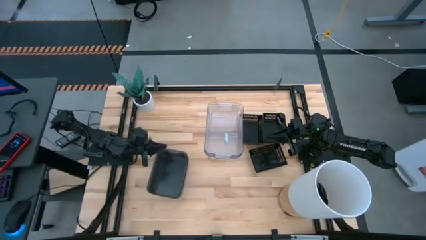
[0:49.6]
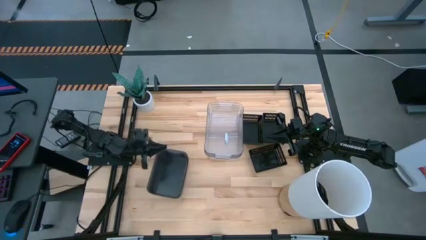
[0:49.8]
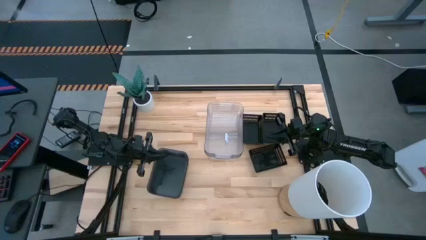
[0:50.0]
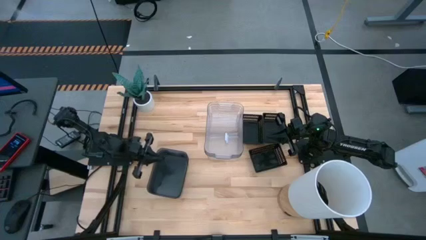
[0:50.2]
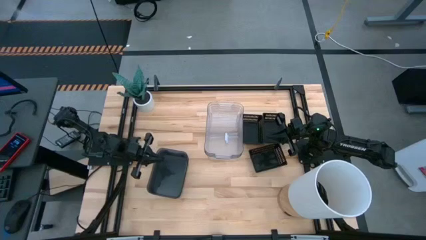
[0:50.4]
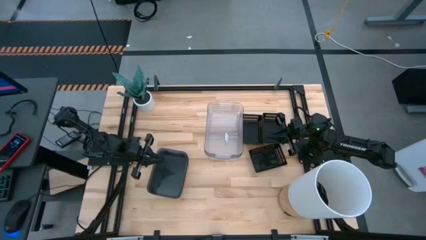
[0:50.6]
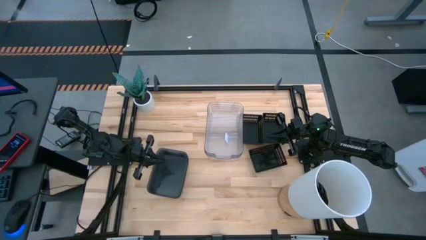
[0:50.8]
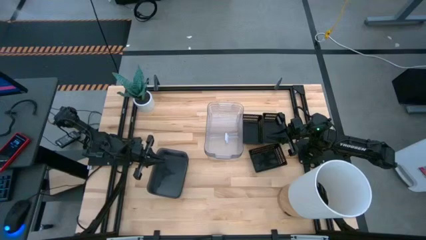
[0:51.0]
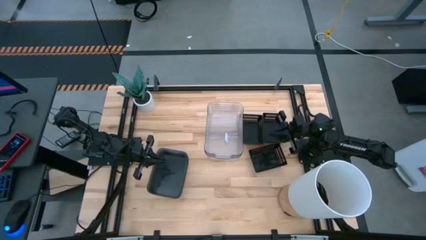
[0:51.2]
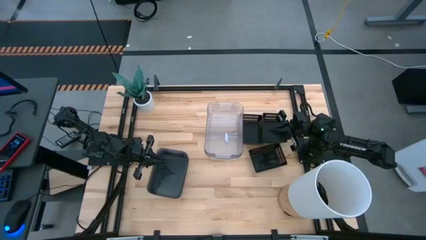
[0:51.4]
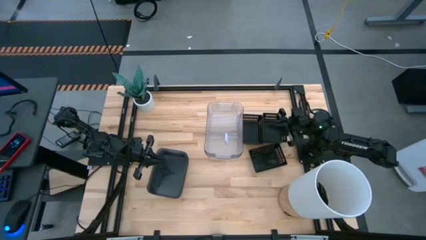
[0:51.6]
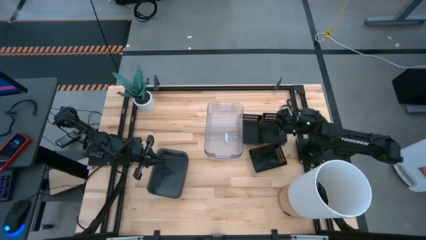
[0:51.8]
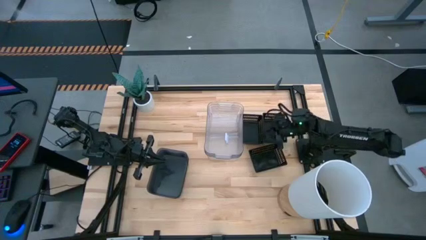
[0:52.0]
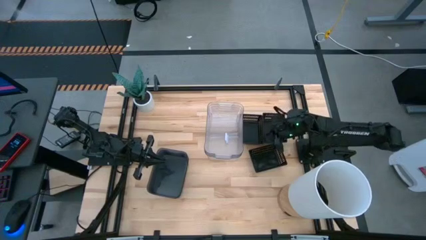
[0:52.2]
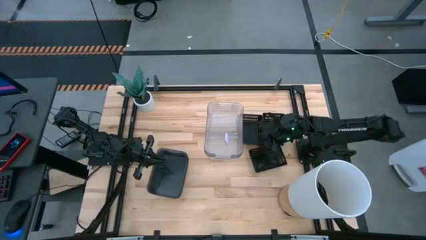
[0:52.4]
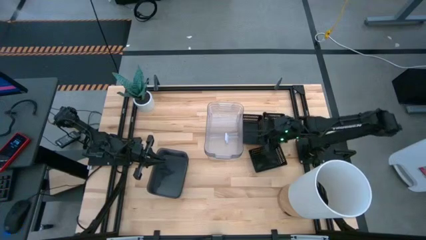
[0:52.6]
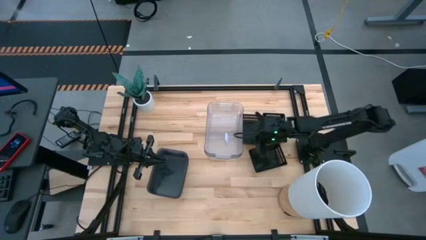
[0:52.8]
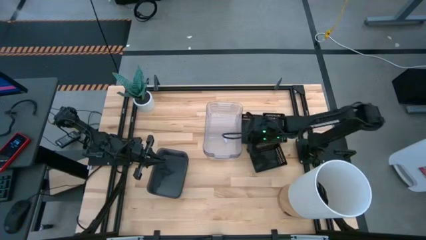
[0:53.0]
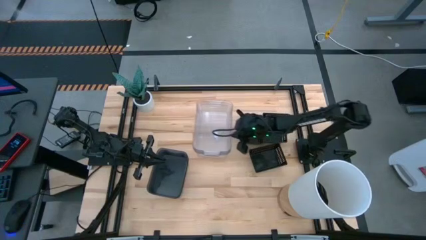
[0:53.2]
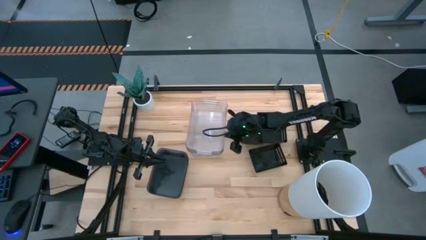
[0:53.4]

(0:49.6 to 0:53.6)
Adjust the stacked transparent bins

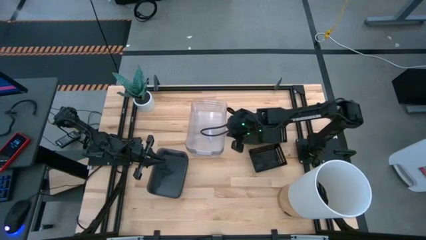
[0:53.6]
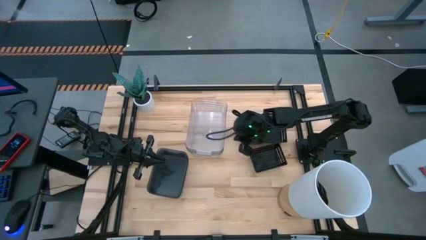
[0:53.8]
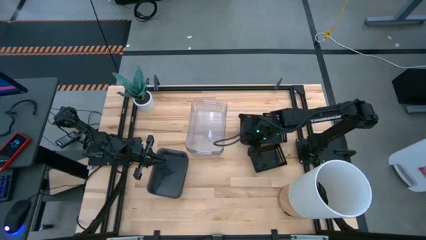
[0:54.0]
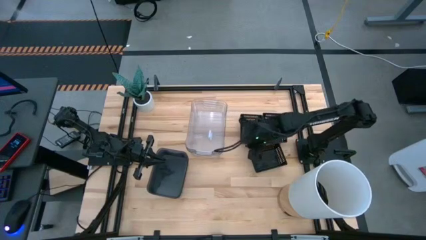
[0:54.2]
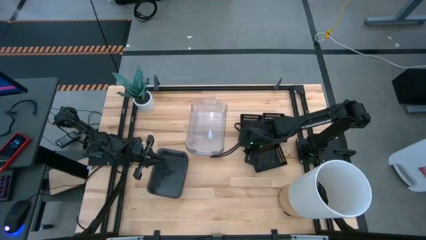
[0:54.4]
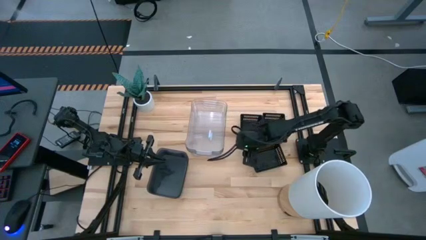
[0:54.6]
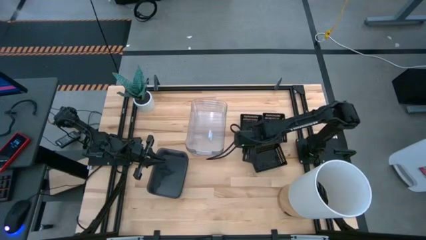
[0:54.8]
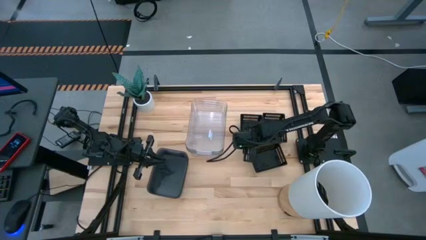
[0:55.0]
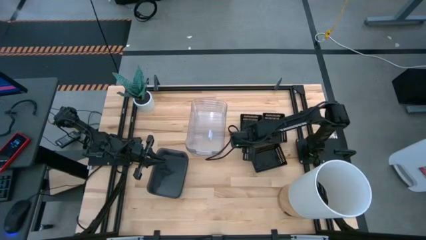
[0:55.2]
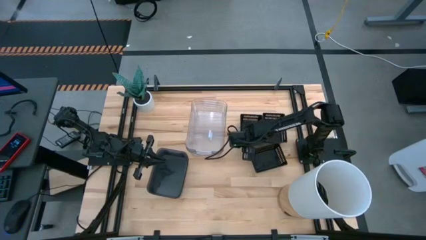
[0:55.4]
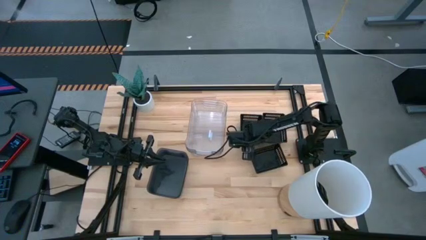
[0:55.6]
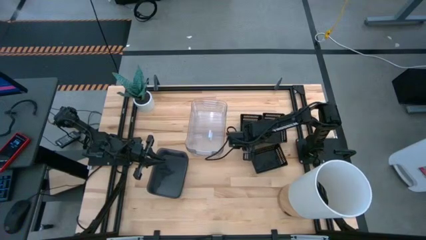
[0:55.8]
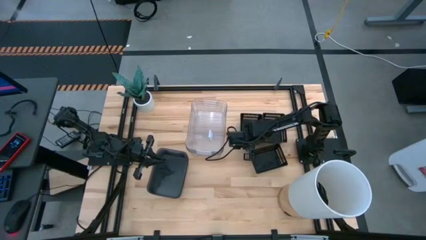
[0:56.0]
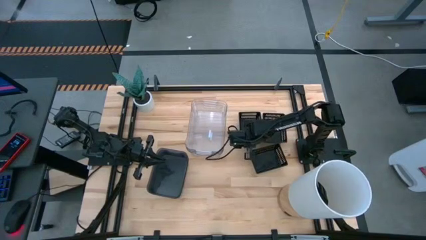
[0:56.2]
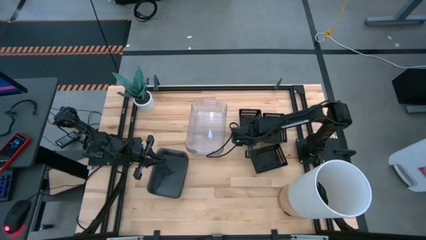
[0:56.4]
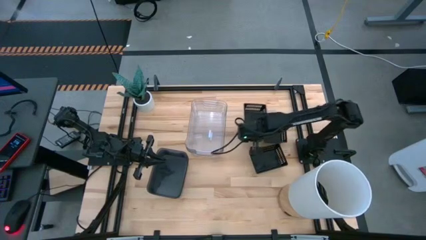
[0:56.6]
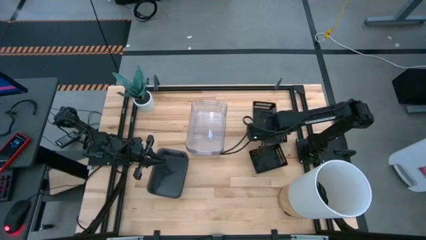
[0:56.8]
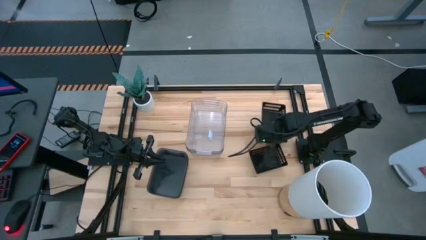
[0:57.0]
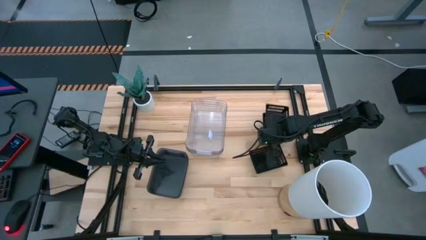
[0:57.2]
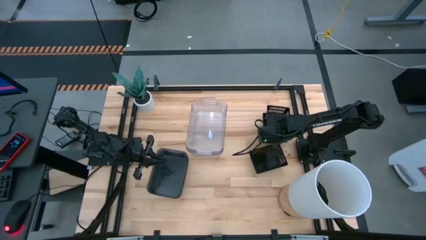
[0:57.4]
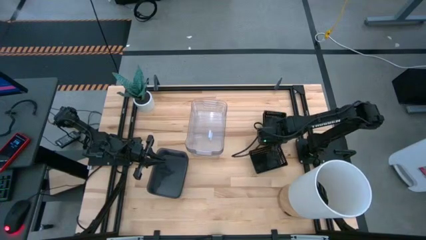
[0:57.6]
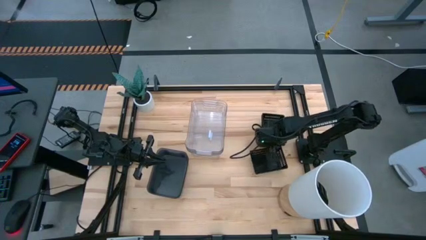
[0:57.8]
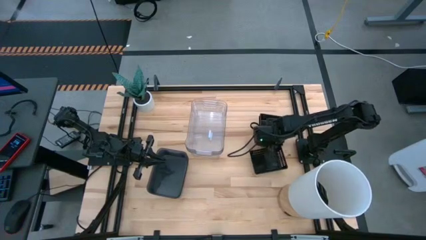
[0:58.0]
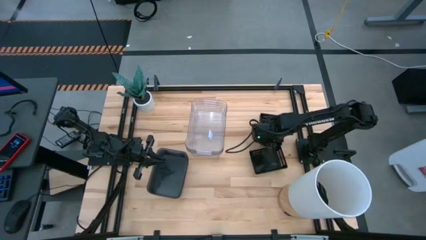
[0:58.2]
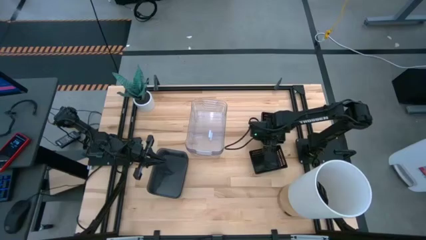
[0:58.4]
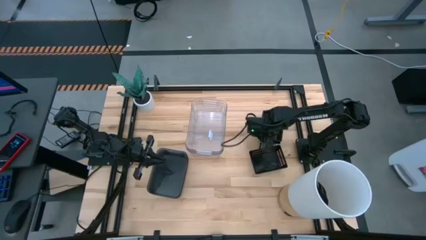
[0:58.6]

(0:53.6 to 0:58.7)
Stack the top left black bin on the top right black bin

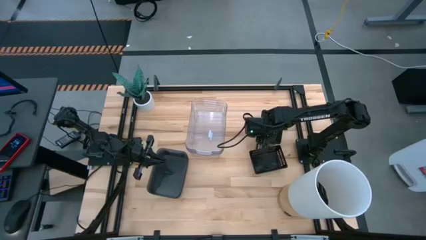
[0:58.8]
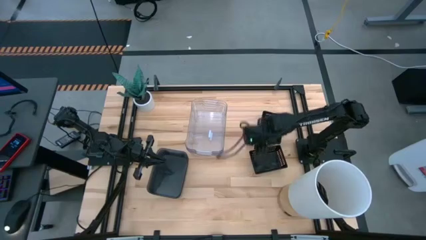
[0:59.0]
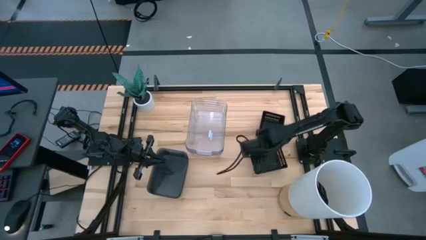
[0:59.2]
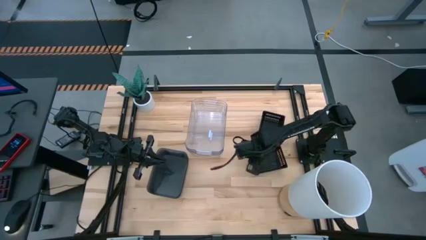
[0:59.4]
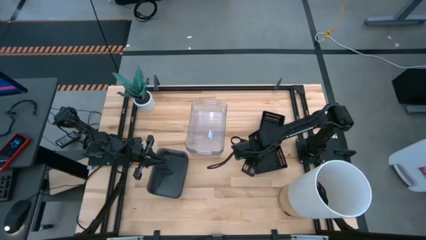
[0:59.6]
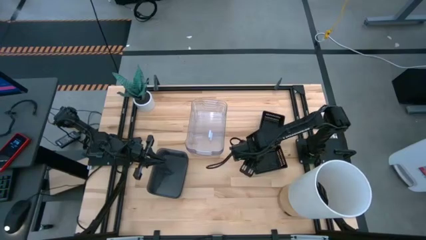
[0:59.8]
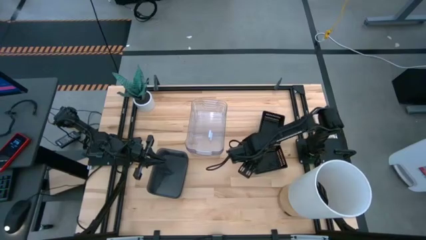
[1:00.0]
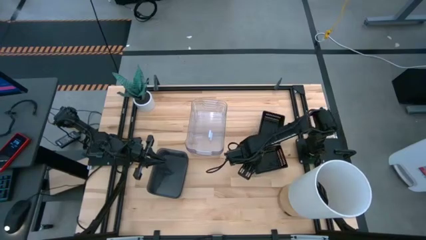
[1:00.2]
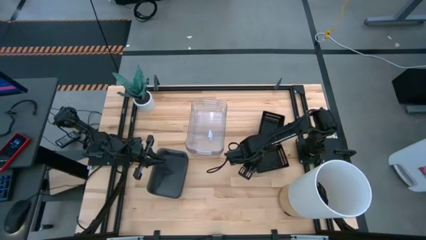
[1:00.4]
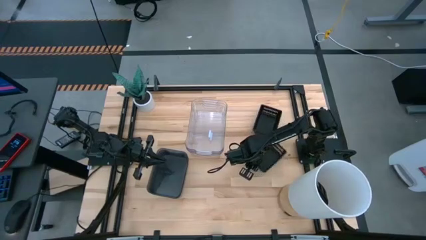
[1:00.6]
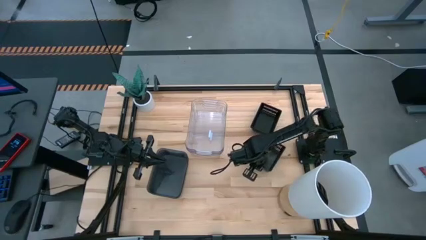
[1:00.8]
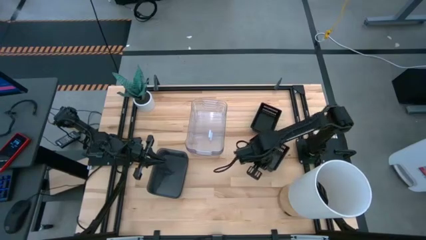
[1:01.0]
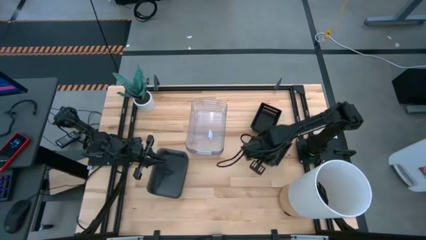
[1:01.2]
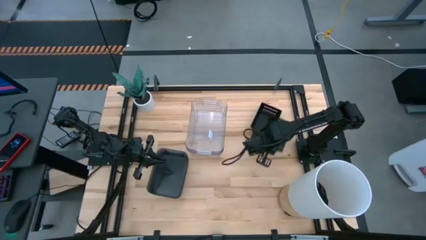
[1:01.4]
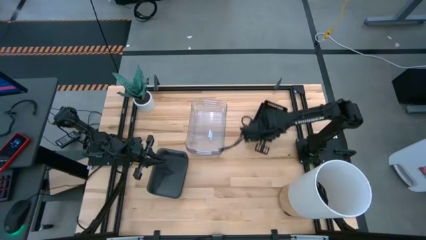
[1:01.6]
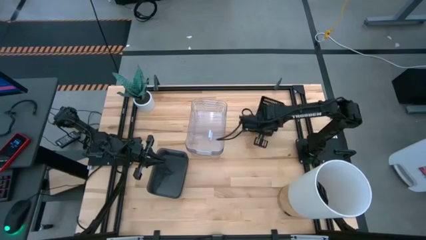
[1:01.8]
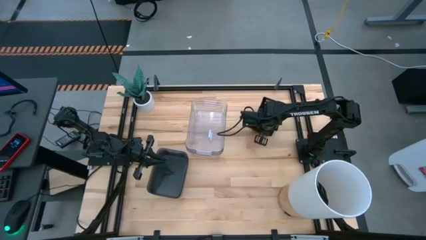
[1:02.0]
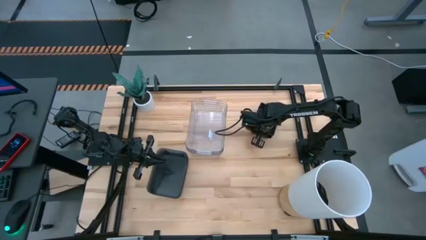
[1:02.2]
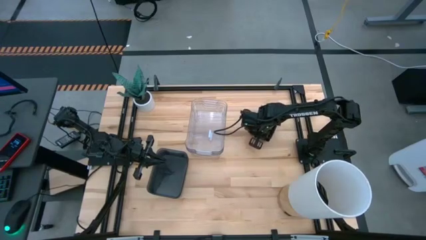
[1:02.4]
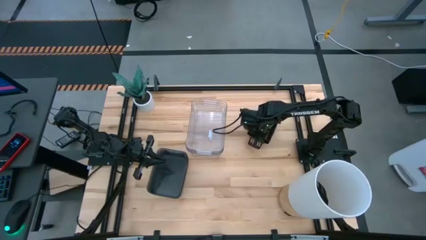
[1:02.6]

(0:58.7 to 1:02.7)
Stack the black basket on the black bin

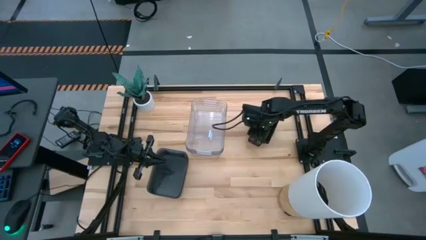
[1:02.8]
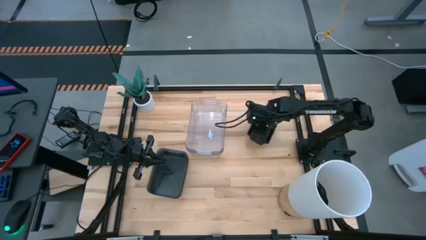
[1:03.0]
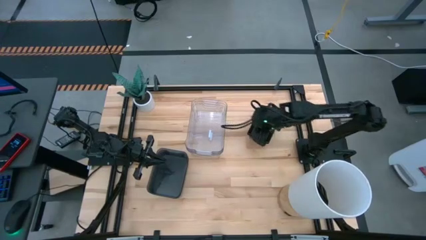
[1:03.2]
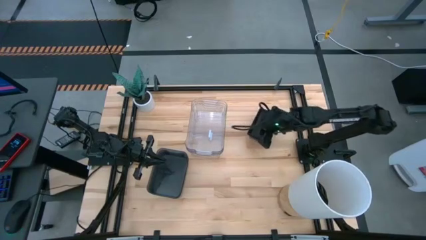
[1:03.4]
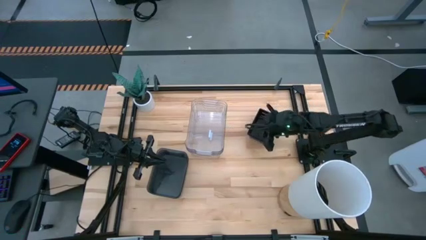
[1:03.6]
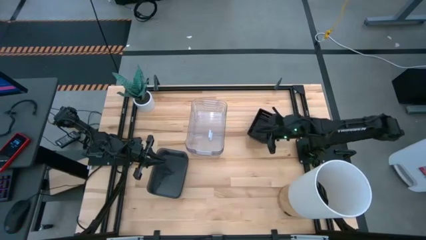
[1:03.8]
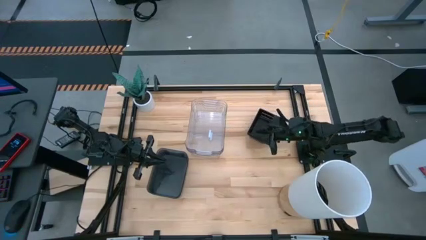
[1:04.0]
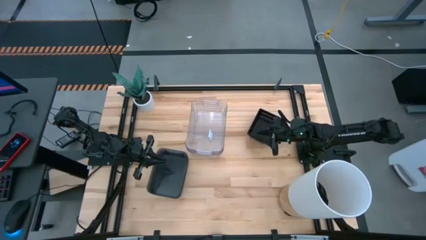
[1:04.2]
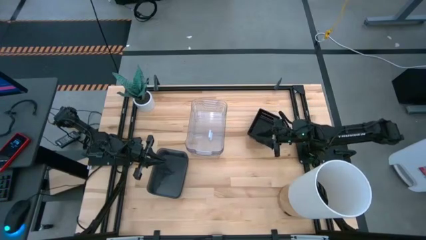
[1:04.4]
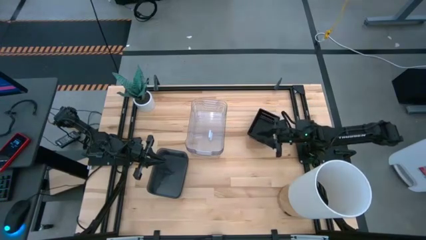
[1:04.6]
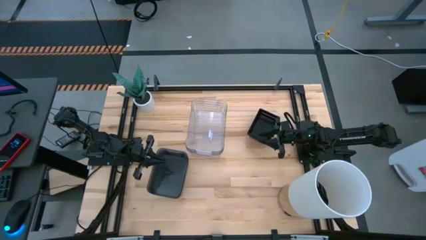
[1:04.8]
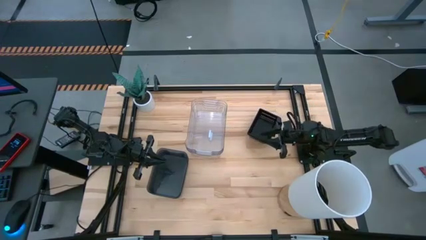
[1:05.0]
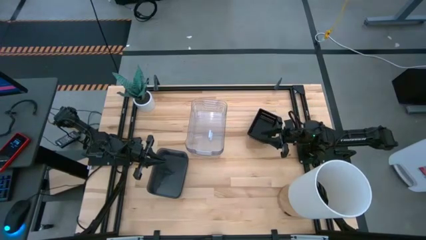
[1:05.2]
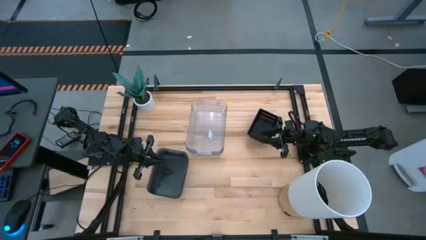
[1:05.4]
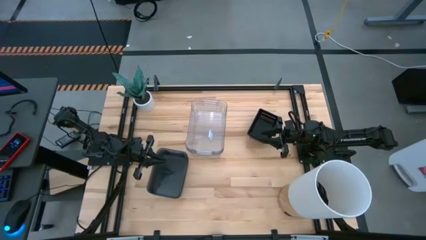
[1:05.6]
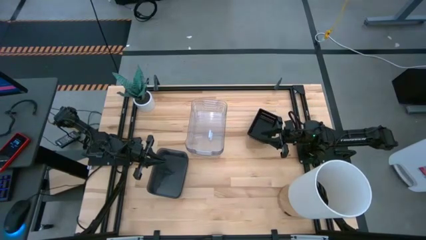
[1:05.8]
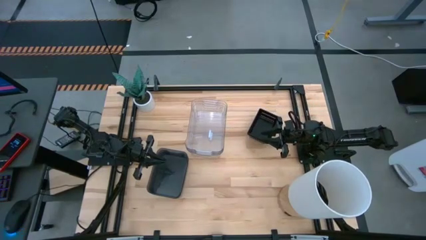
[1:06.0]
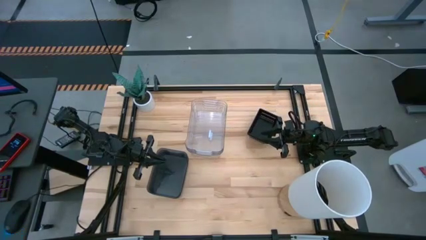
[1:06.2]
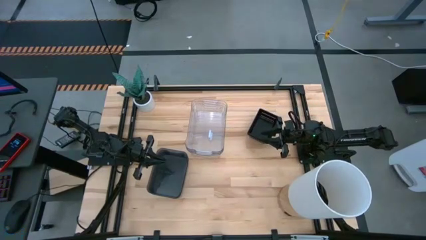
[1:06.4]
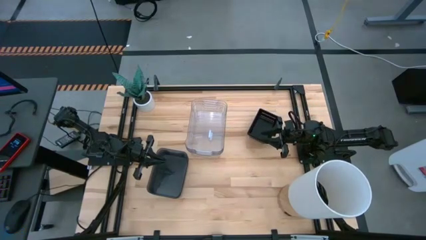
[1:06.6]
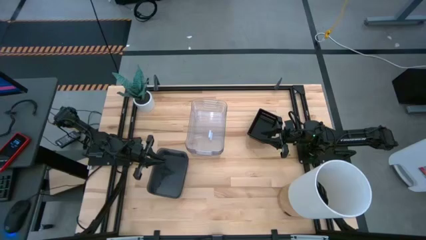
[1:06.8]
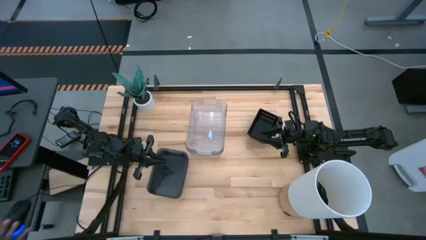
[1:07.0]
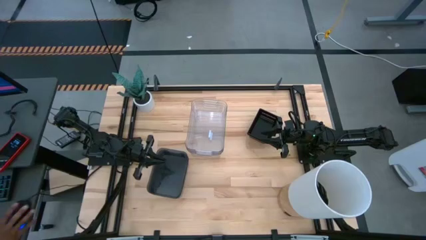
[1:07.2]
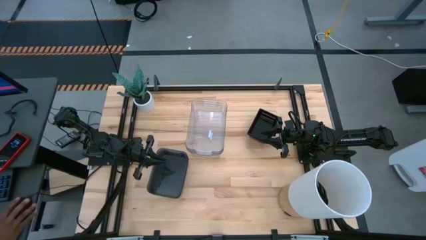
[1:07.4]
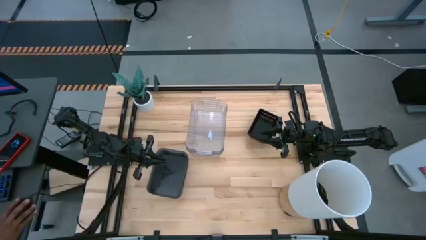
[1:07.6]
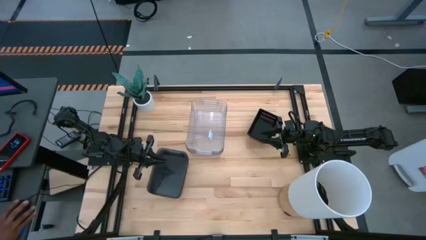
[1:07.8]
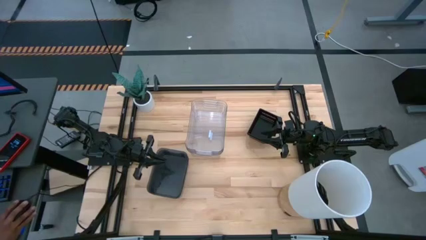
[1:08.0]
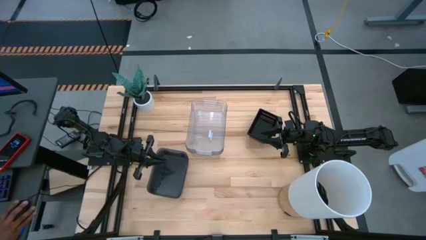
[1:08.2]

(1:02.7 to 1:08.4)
Return to Home Position
